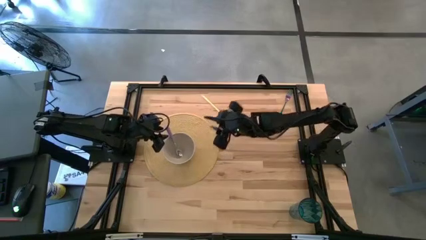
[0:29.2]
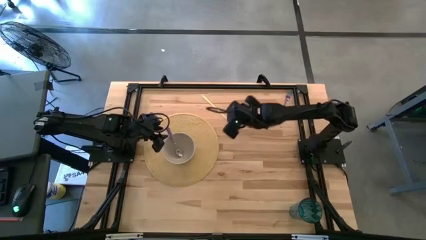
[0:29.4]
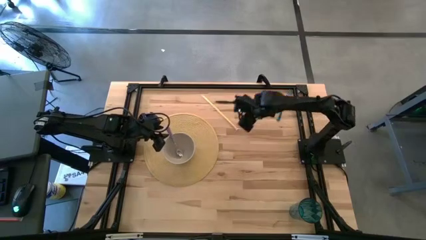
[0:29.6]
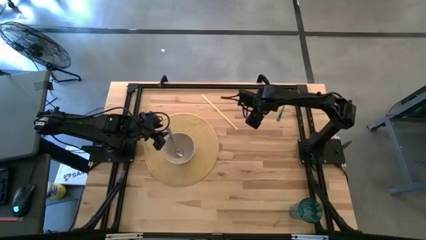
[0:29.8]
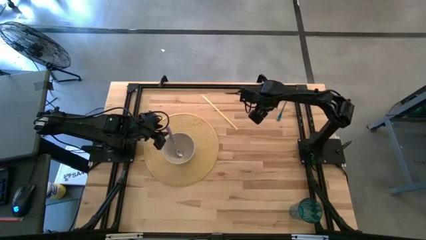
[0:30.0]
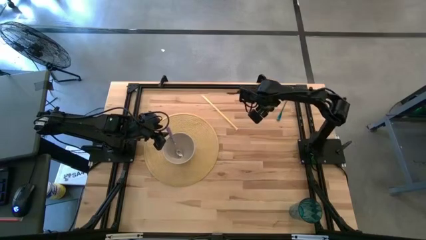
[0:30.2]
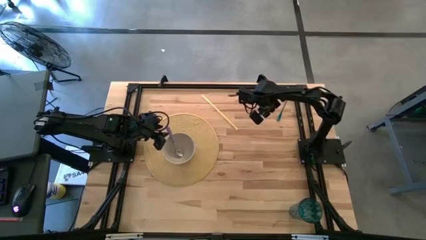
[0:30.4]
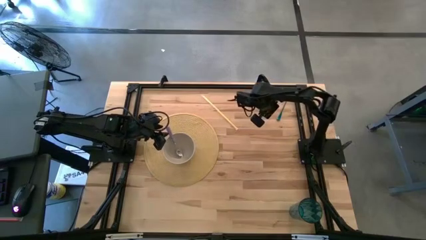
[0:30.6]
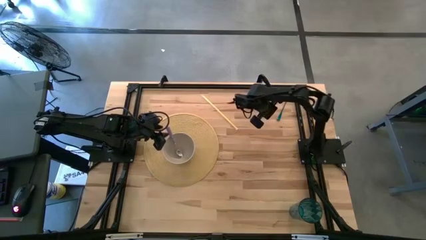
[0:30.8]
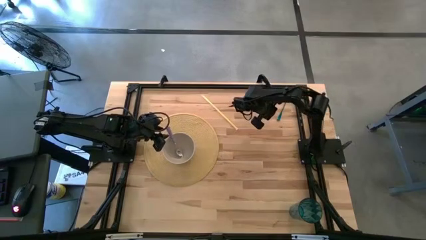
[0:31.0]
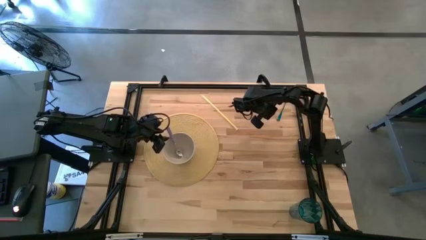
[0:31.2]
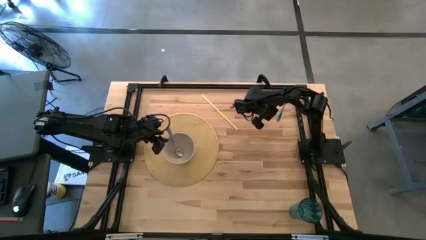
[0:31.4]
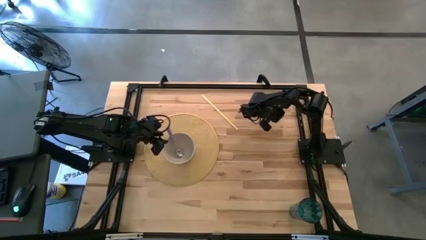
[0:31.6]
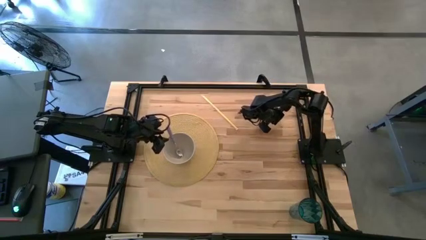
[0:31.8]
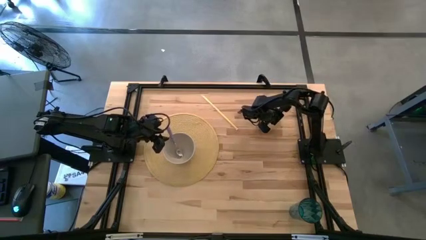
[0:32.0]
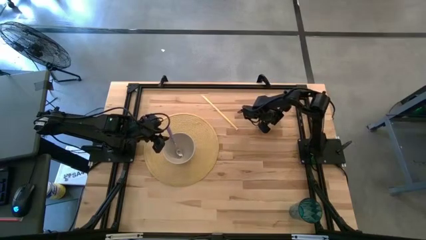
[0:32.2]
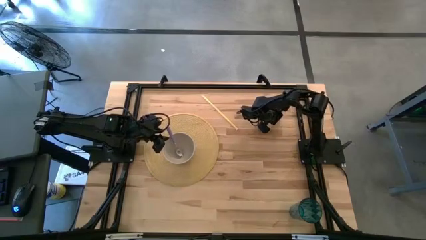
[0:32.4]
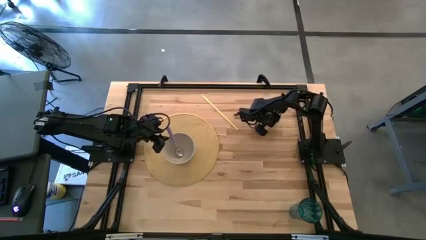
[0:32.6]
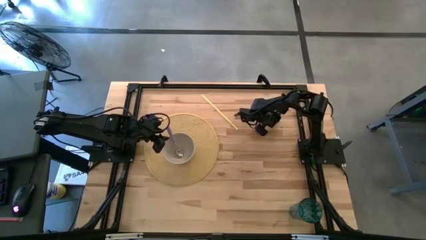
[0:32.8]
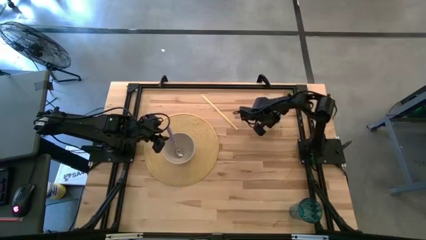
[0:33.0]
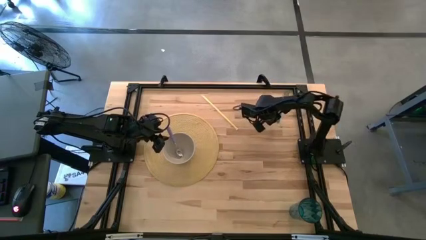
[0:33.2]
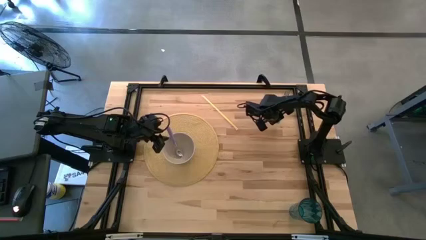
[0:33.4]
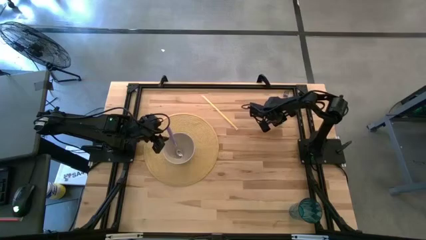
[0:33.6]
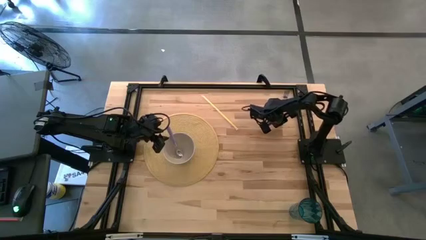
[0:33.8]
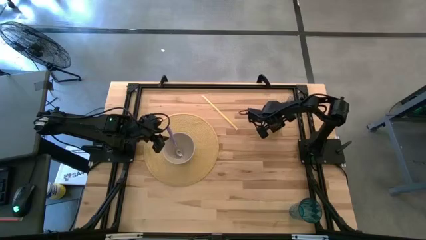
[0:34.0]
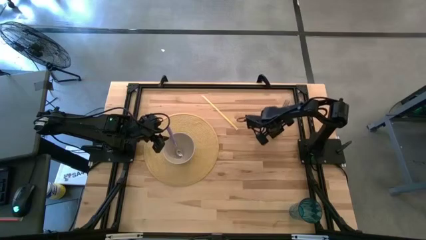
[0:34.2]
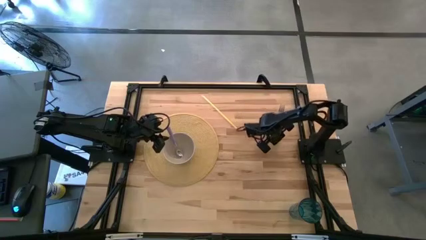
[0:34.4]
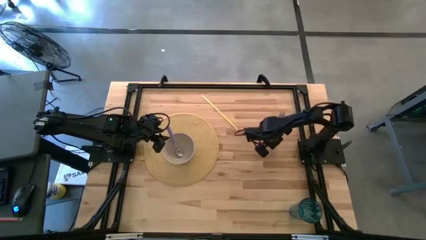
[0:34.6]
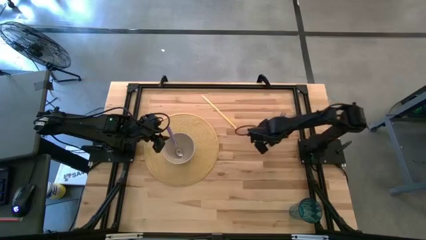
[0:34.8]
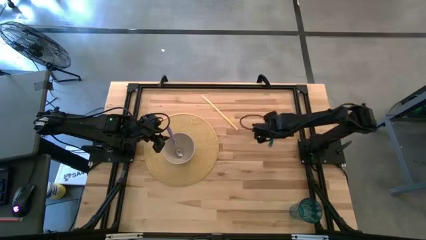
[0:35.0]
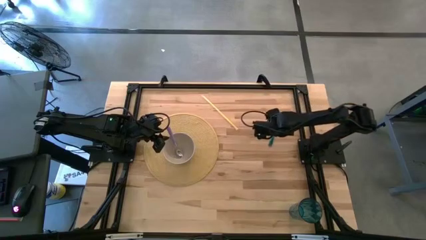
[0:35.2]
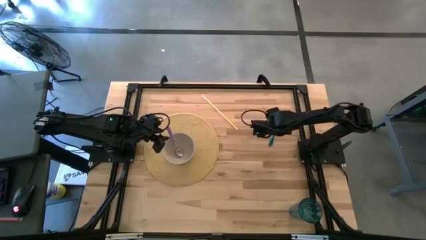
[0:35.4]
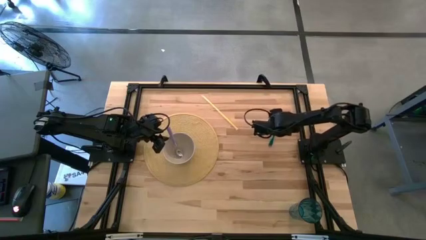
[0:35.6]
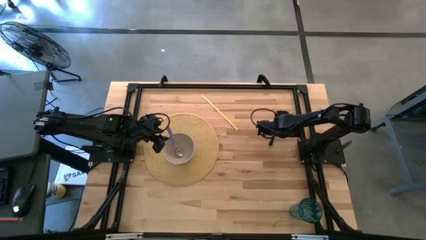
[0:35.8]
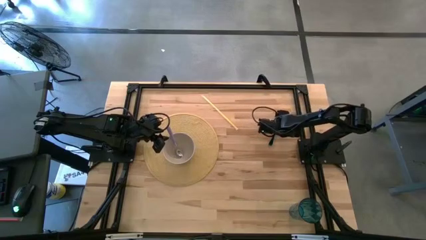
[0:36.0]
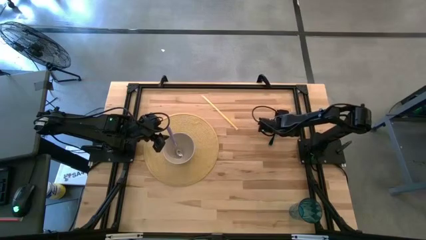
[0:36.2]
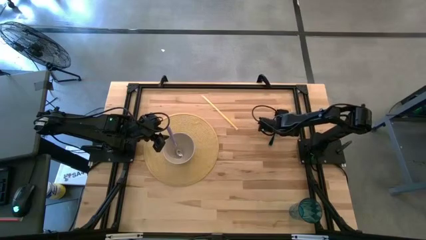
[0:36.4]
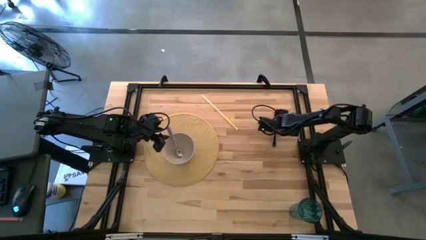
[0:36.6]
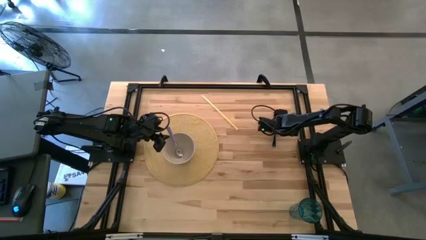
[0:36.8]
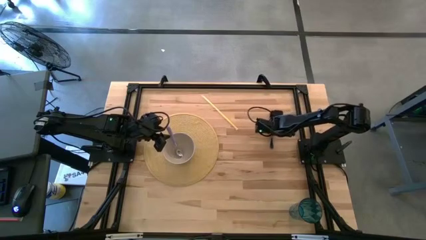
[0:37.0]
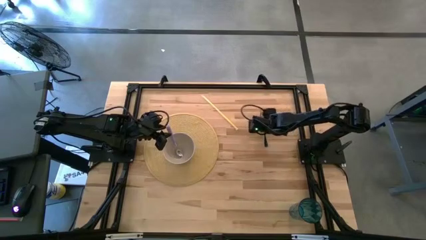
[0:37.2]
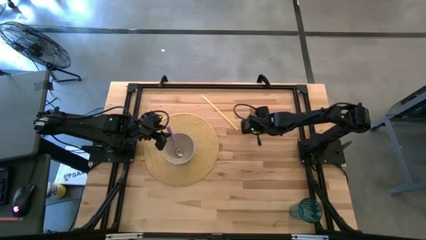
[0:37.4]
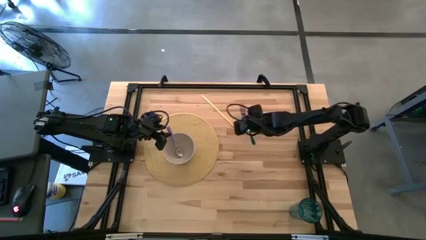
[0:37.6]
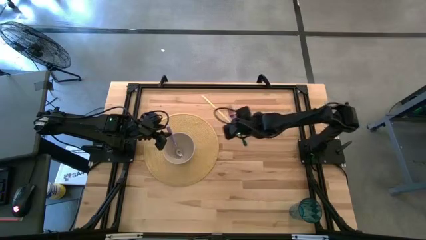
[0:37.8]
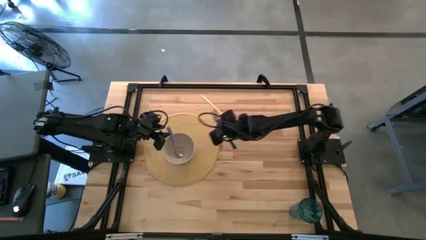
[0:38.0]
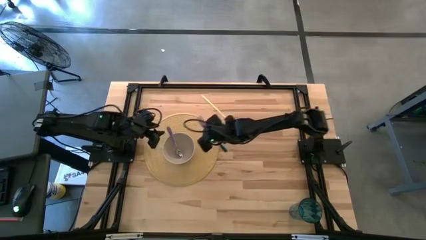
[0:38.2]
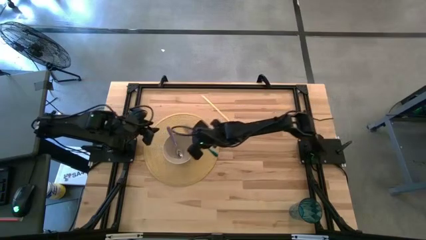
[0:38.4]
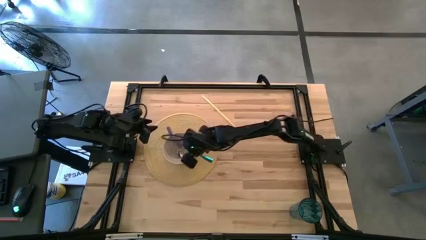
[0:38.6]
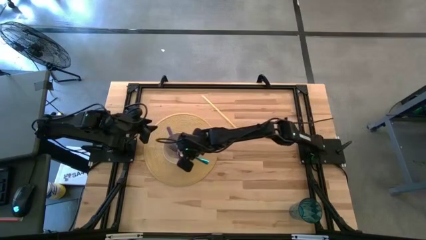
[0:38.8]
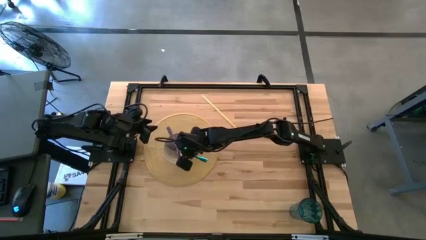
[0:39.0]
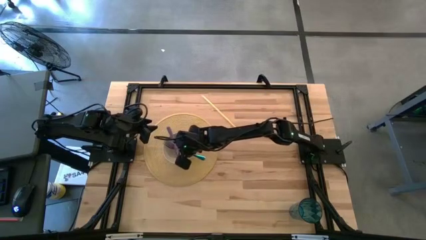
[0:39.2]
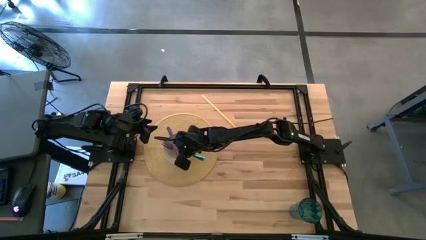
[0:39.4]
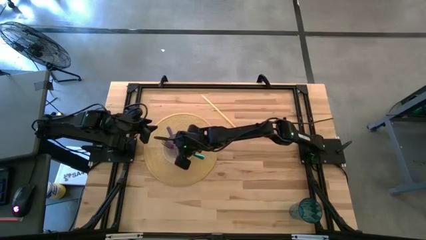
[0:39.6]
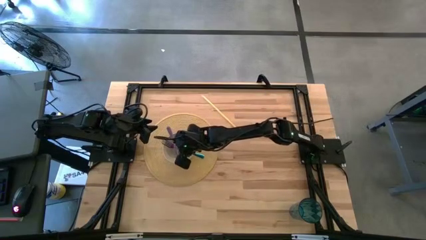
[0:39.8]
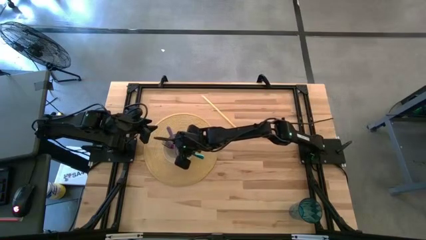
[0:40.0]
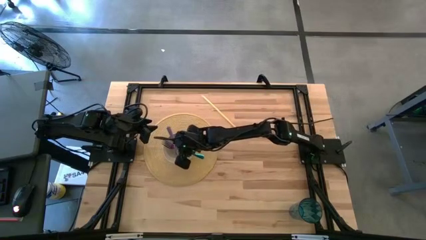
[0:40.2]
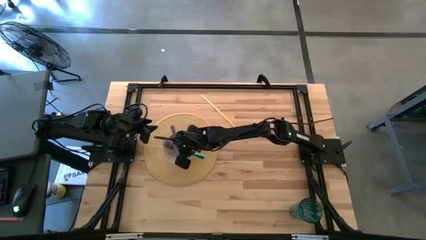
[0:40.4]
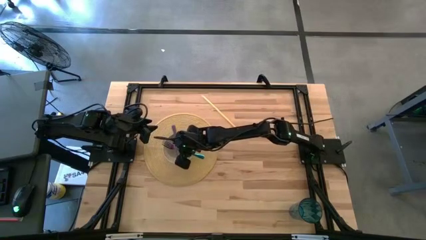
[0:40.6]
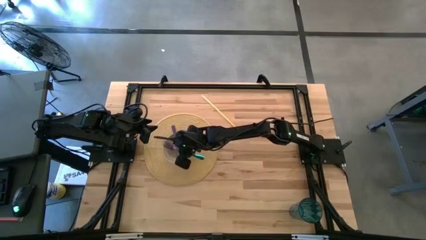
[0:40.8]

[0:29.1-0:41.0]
Task: Pick & Place Utensil
Put the blue fork into the white bowl

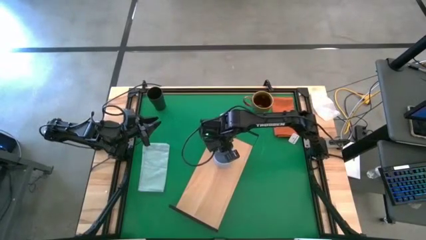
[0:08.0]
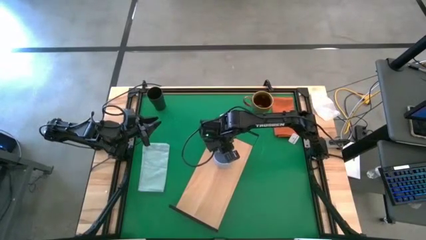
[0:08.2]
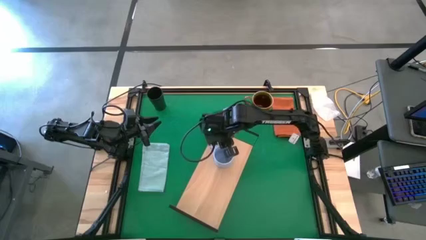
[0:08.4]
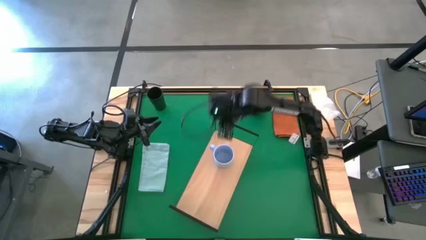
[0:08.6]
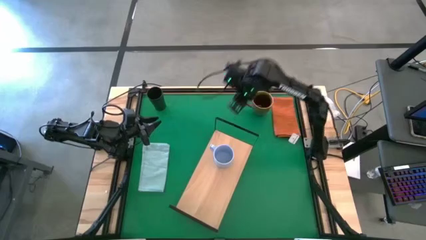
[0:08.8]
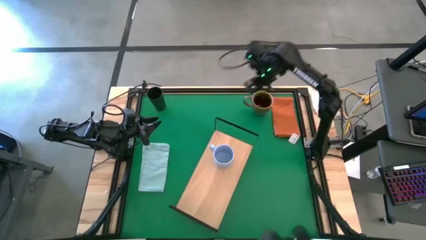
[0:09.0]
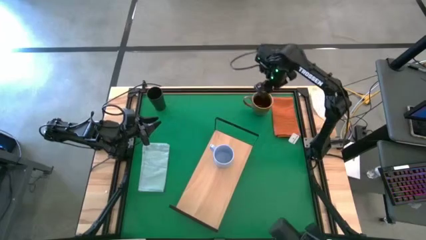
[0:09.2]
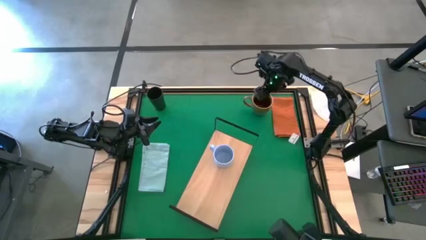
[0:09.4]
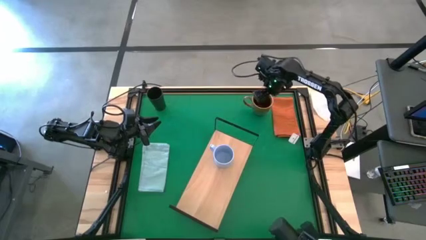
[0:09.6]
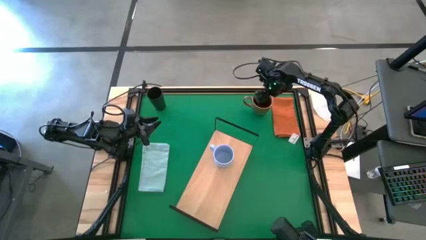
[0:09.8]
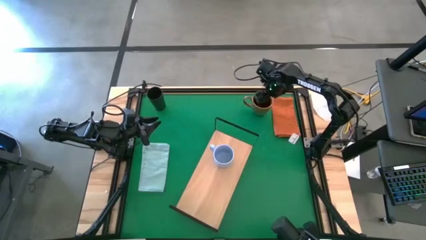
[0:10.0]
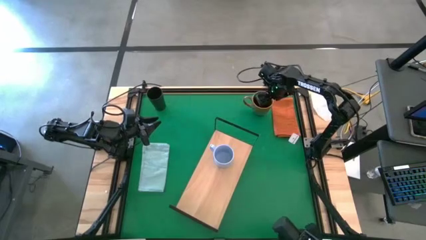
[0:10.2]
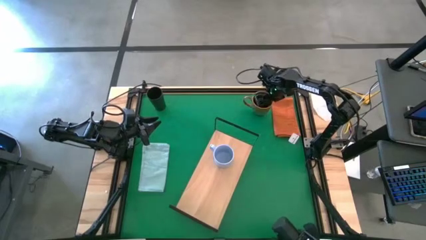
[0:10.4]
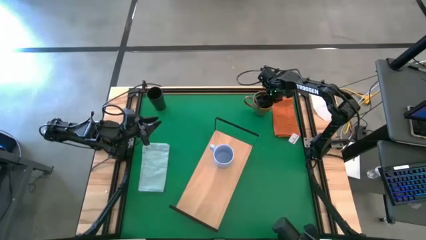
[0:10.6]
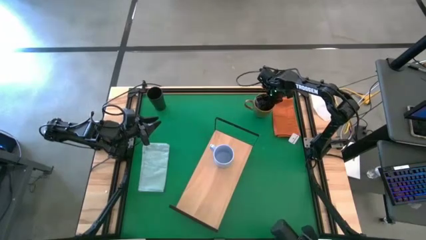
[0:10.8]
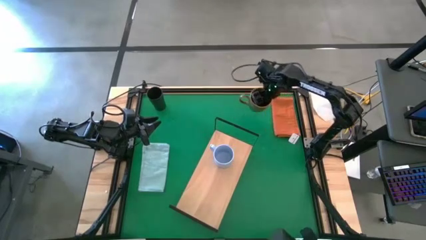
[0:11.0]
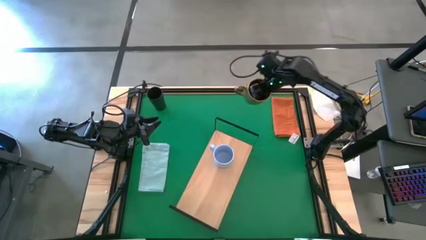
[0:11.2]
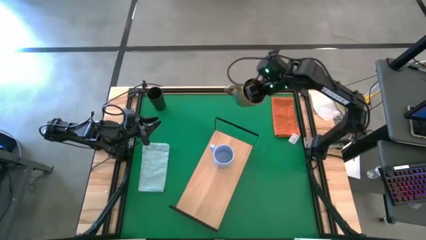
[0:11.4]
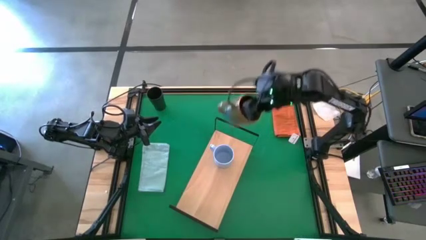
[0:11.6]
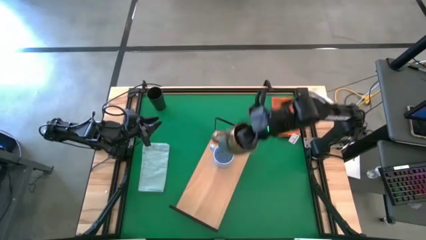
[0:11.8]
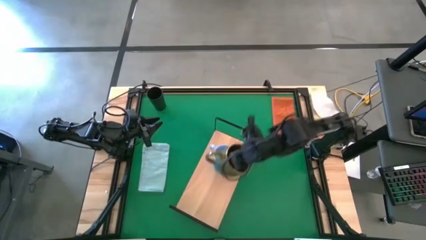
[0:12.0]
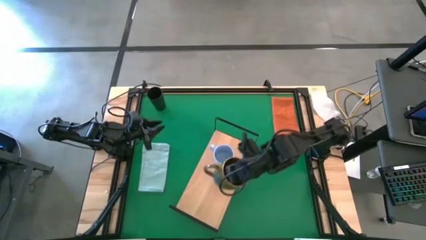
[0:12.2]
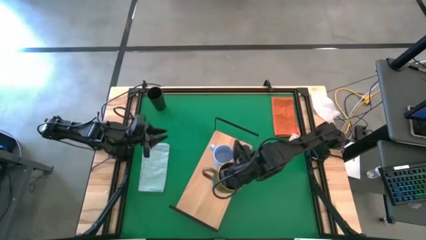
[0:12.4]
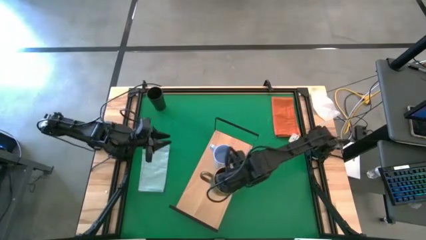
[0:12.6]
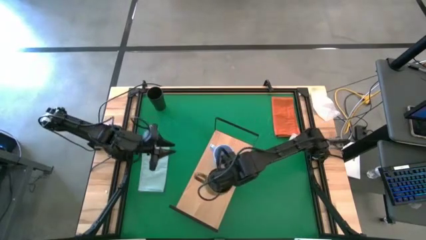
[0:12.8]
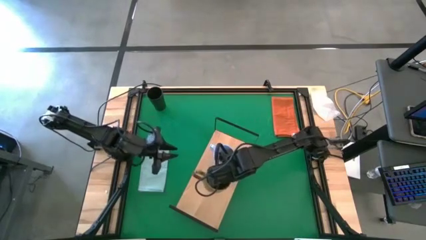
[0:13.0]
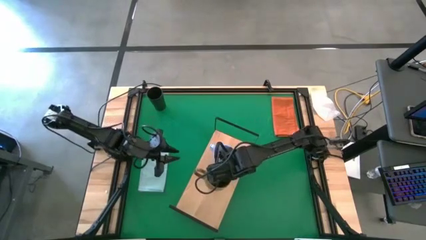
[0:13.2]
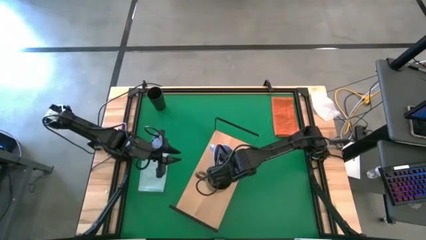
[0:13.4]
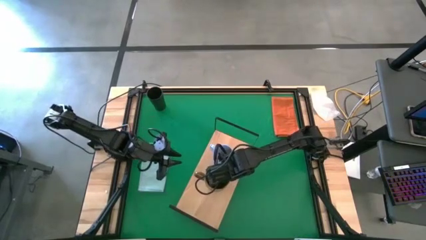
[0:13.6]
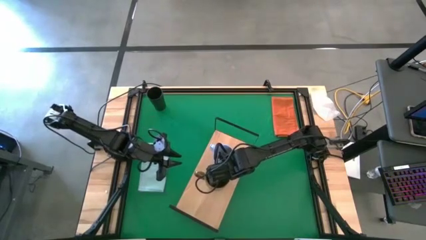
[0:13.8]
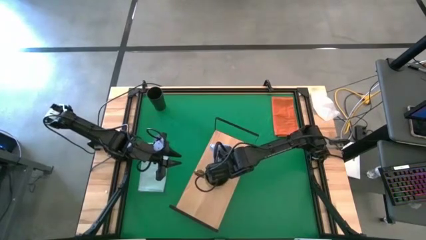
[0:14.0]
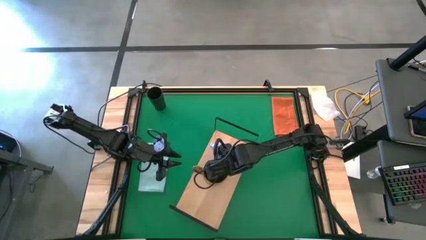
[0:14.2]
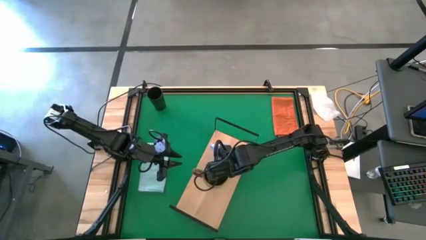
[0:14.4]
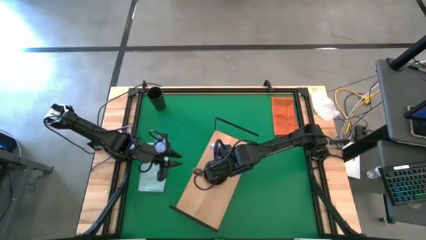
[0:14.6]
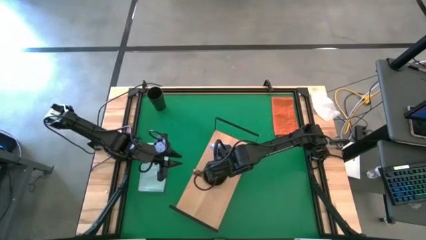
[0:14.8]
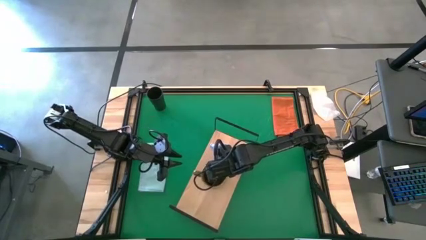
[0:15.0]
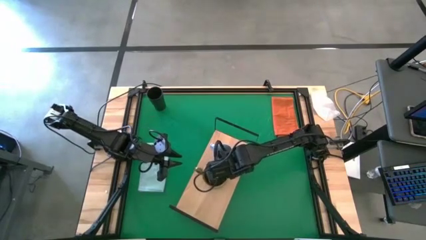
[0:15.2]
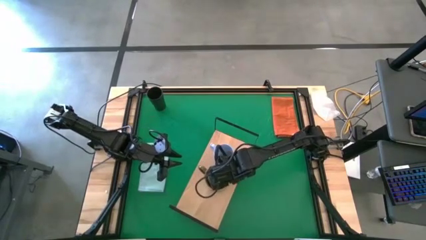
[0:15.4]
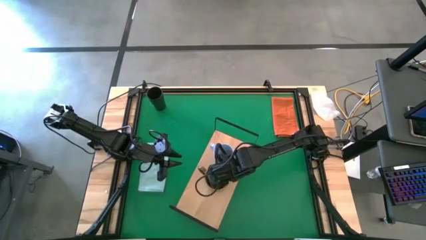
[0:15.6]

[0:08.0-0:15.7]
Task: Stack small to large cups/mugs on shelf
Put the brown mug on the shelf
